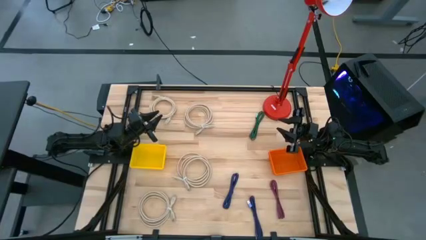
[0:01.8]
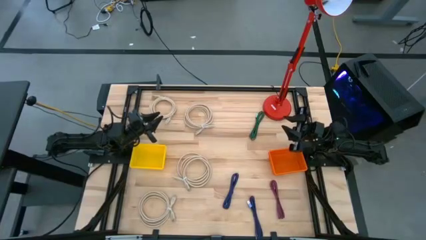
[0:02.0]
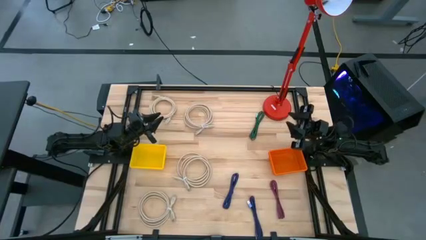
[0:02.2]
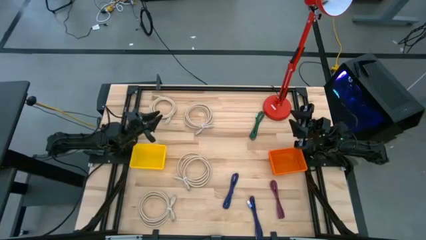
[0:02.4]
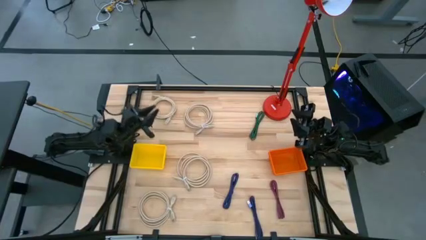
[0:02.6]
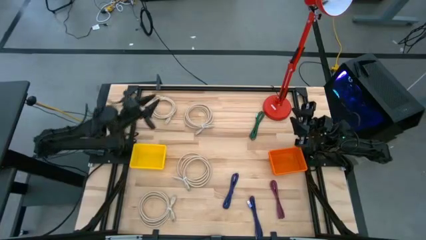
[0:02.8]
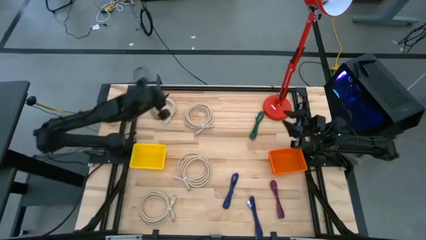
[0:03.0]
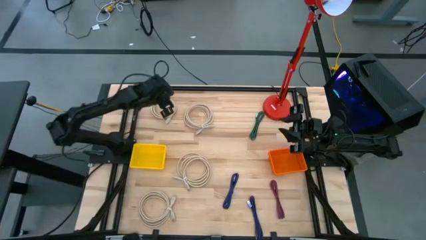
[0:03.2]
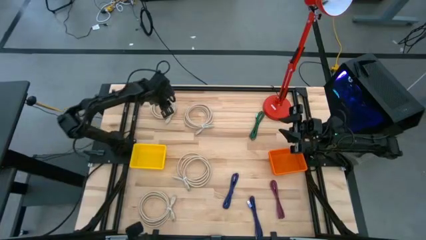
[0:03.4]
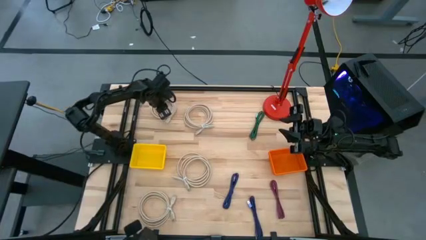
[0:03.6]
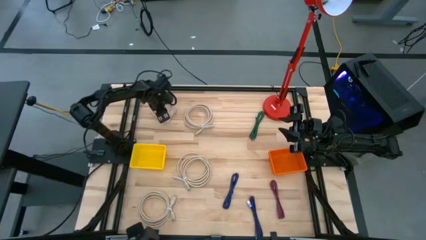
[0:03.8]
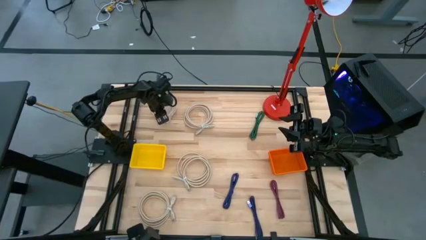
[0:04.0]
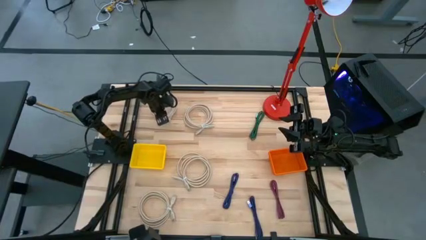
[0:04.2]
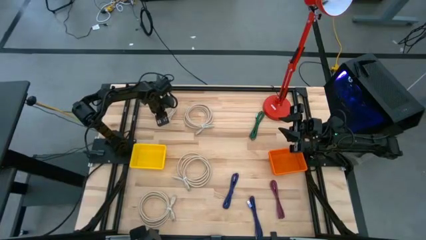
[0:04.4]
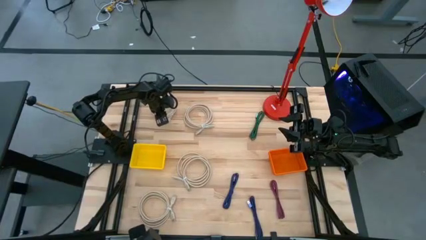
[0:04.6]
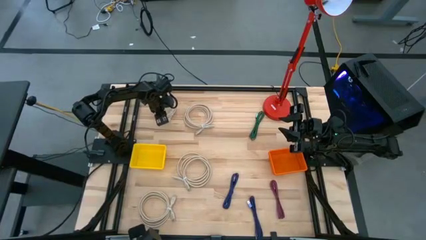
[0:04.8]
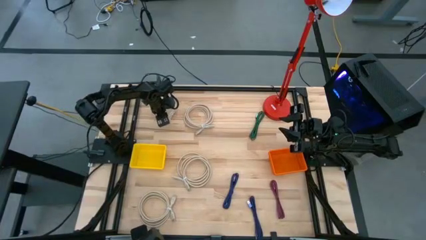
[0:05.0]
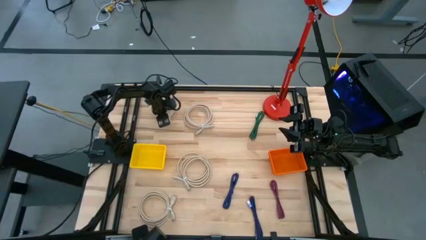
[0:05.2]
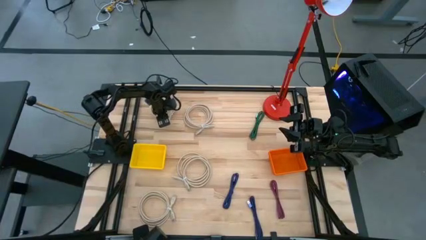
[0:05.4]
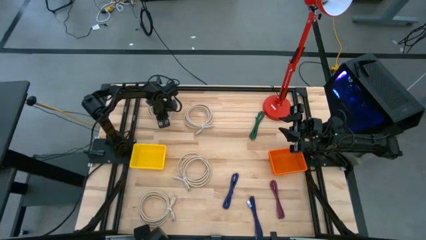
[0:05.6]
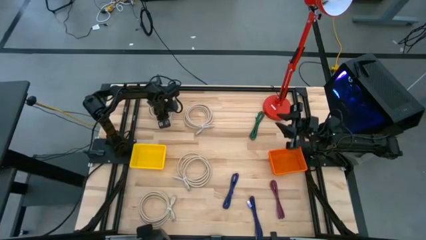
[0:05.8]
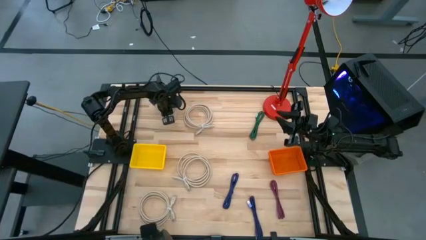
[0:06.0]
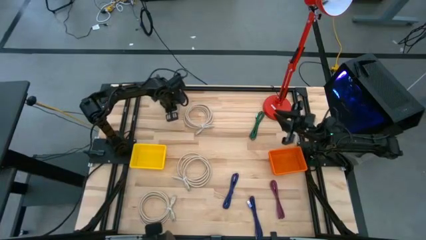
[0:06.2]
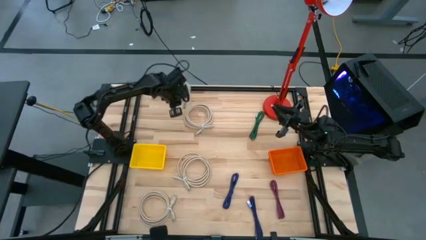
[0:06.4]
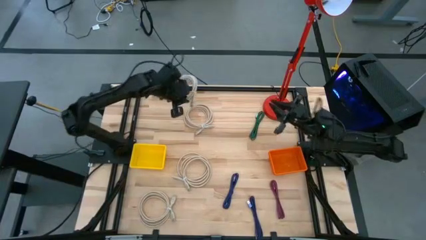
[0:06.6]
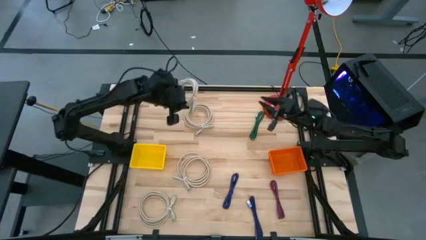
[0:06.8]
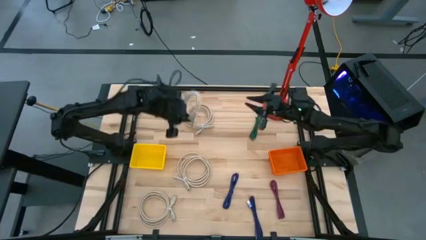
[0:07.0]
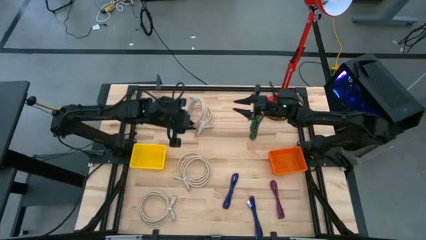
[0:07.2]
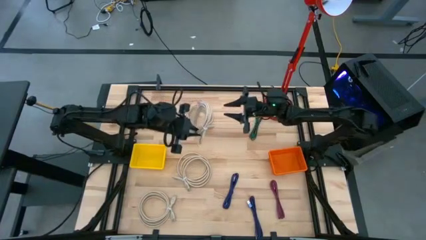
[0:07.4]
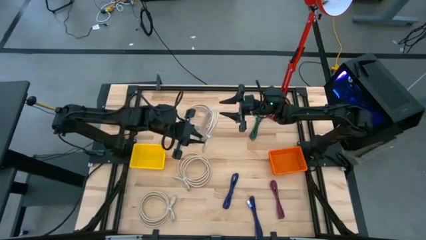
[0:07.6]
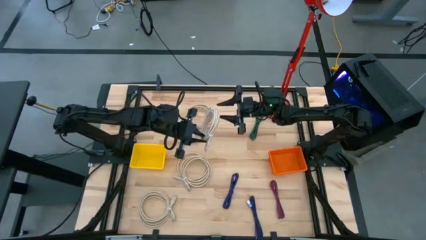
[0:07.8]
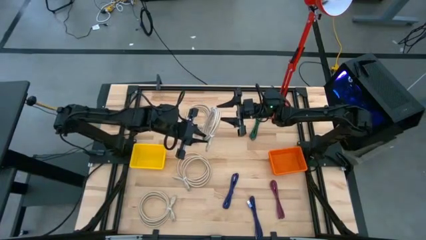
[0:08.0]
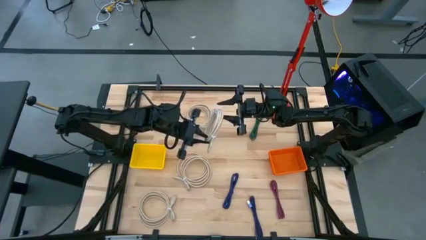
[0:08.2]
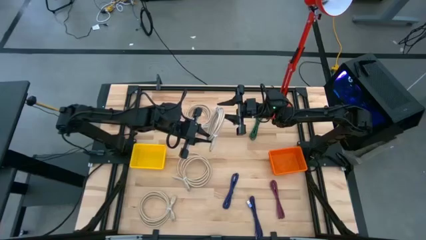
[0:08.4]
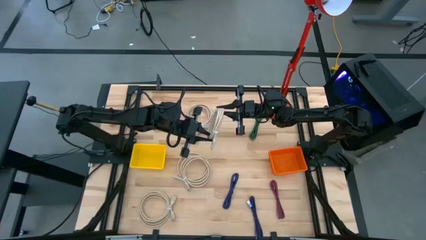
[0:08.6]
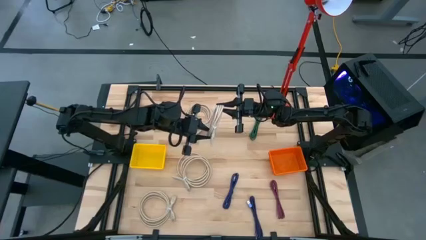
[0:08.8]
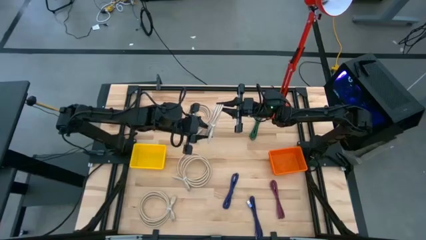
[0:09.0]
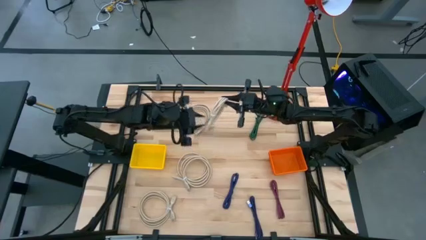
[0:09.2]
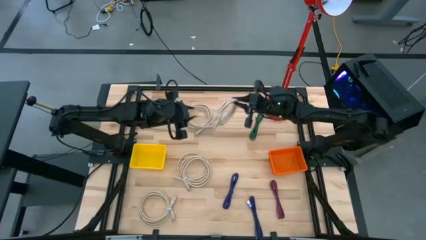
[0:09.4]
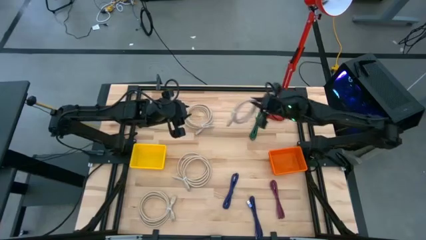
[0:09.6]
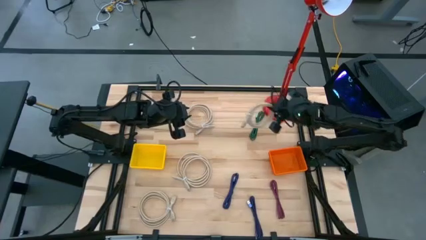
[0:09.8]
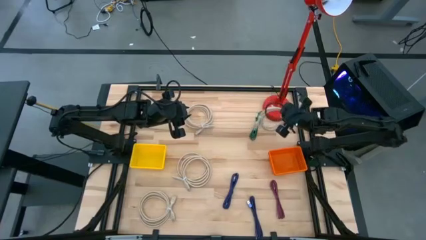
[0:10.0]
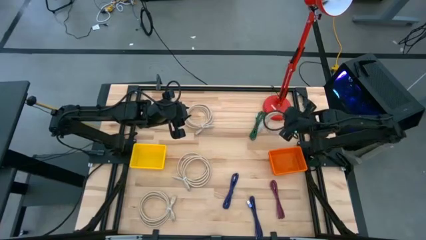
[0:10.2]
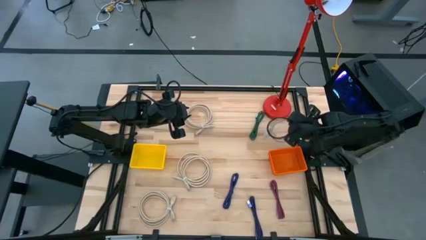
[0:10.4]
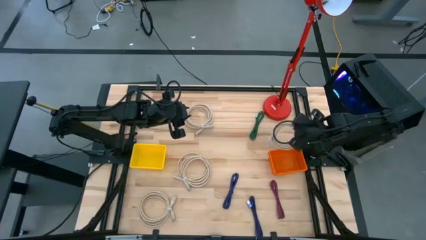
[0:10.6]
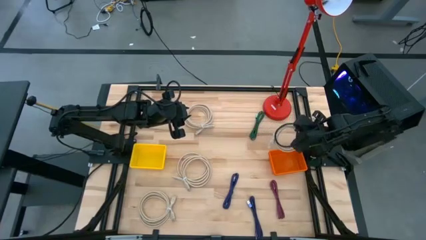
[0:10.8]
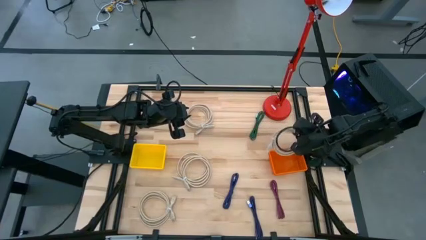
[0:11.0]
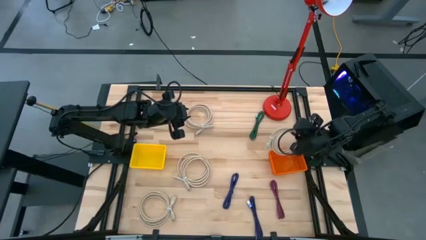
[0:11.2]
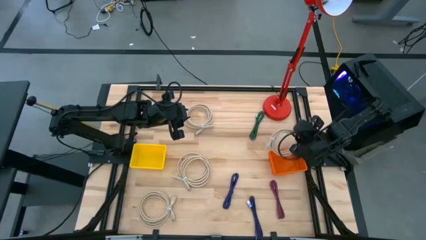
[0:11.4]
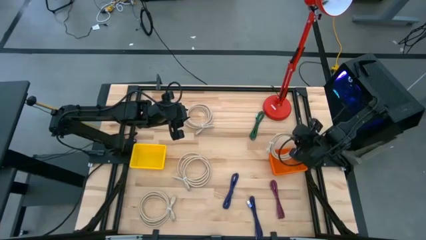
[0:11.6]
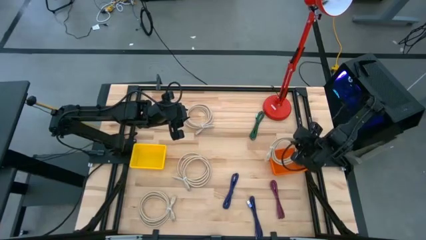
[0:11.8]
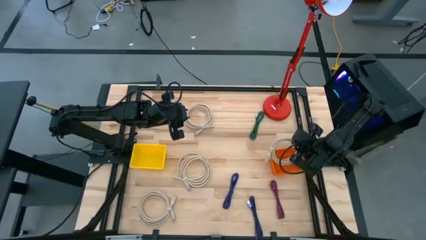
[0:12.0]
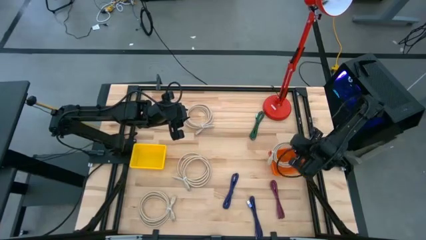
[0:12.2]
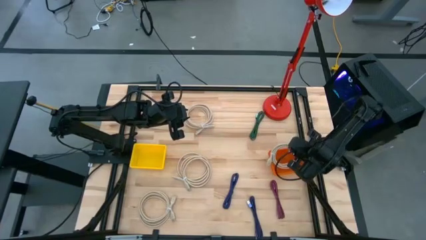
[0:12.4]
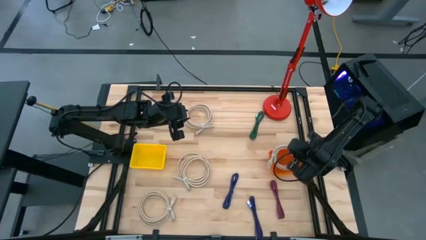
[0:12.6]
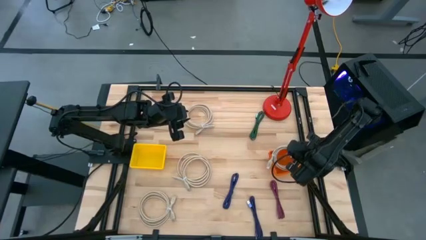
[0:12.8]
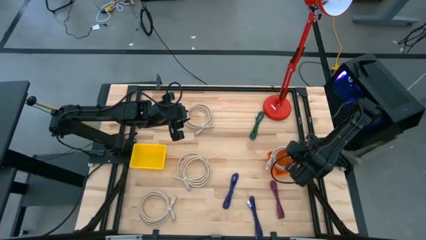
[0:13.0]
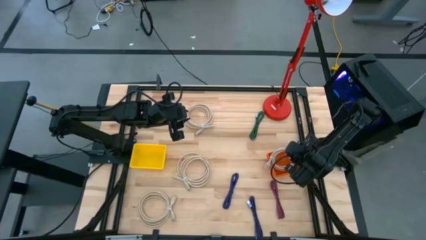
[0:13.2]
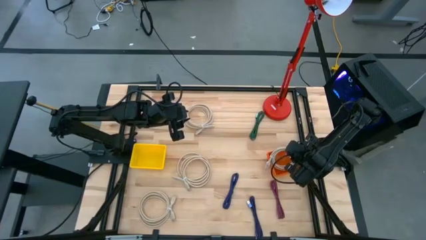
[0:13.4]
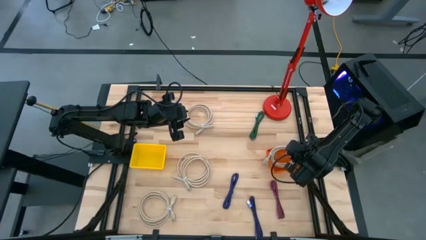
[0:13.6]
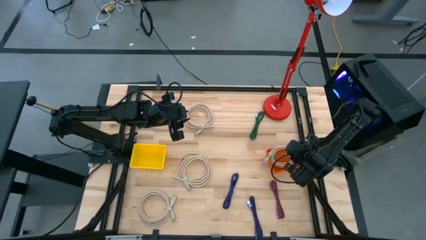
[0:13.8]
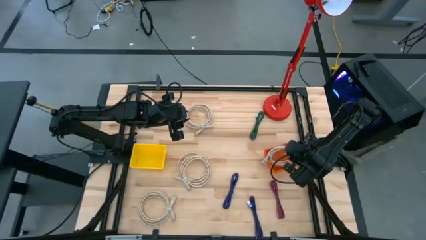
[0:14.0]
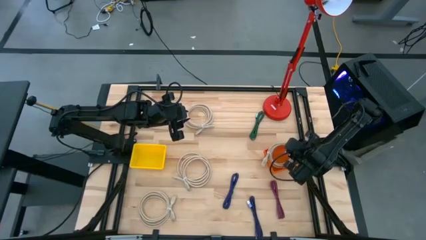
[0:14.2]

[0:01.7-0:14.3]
Task: Pick & Place USB Port
Put the brown HDMI cable into the orange bin

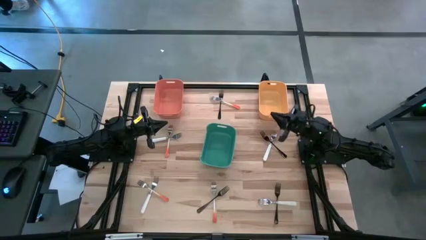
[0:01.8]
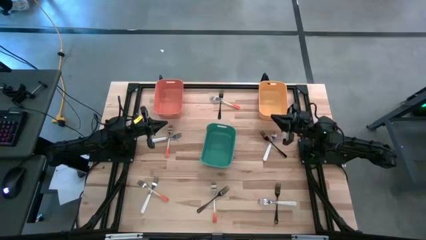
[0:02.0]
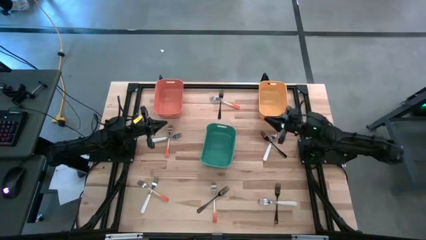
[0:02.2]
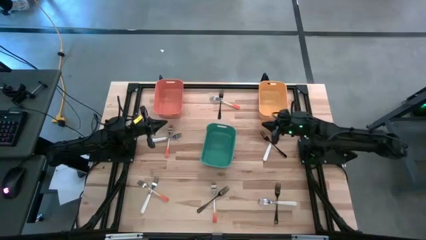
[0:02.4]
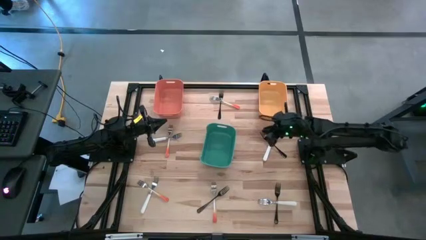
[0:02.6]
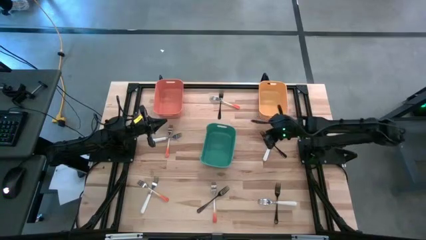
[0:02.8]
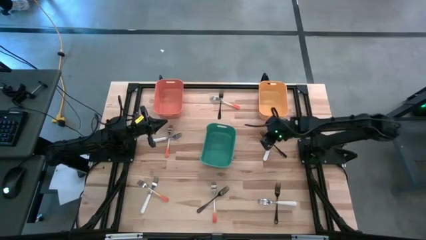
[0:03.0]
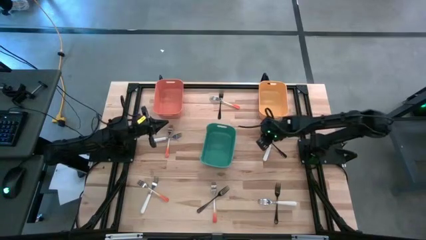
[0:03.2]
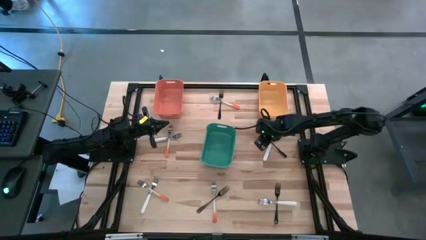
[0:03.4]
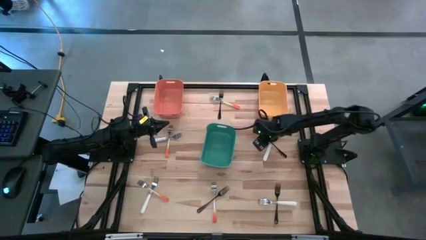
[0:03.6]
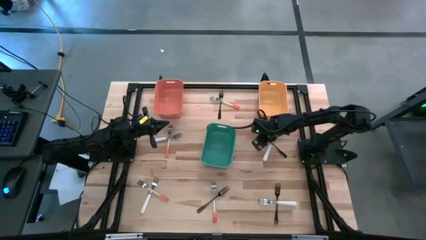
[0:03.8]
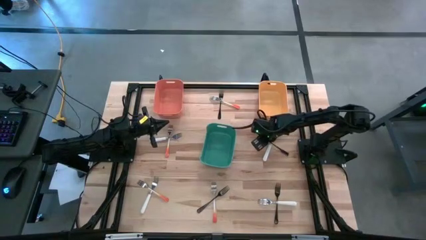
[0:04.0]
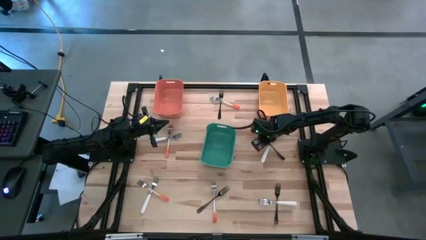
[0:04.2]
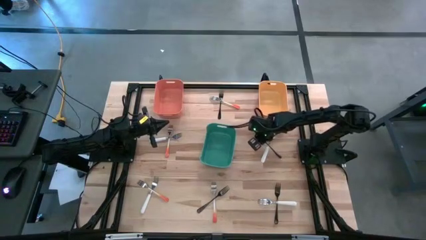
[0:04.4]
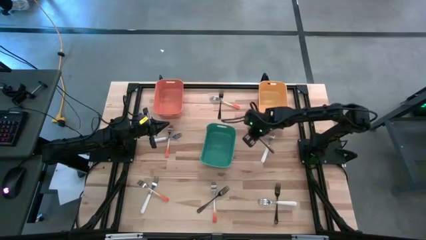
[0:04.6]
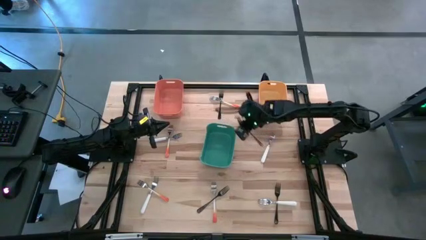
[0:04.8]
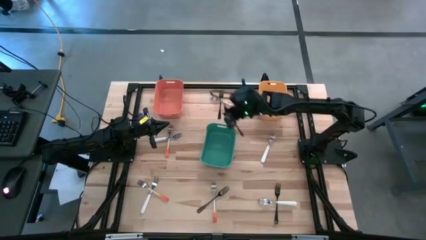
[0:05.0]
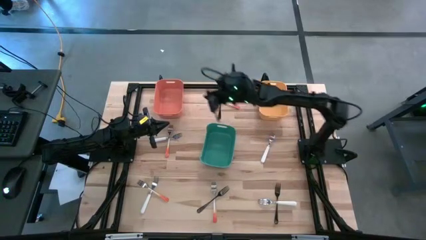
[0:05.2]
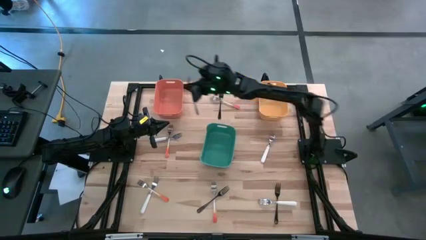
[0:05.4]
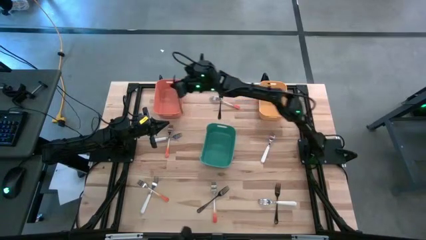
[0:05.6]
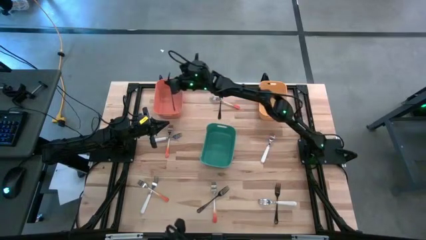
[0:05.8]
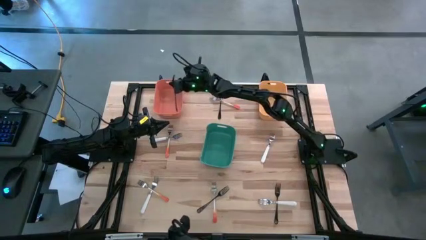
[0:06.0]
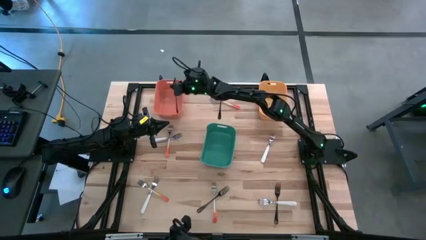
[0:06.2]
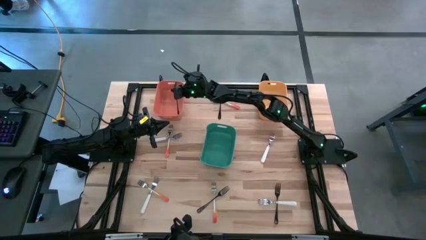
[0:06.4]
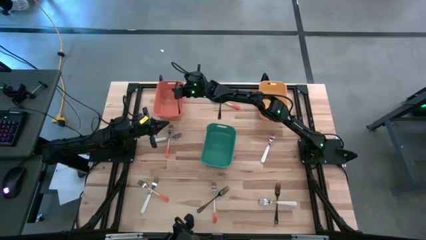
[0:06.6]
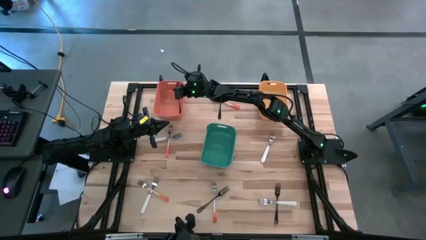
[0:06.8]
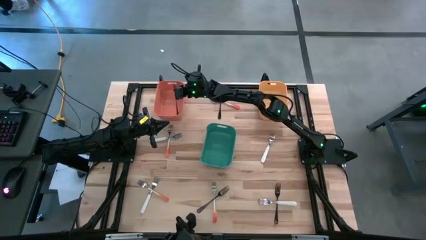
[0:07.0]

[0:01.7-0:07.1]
Task: Sort silverware by color (type)
Put the middle right black fork into the orange bin
